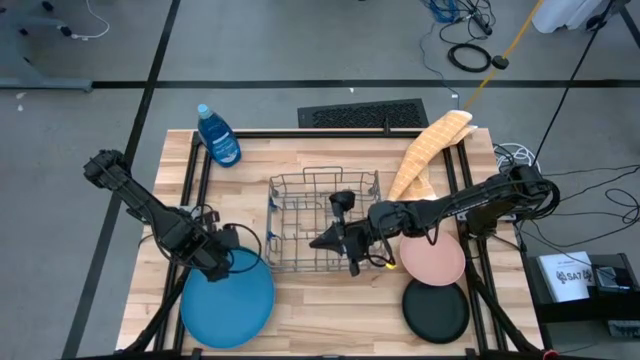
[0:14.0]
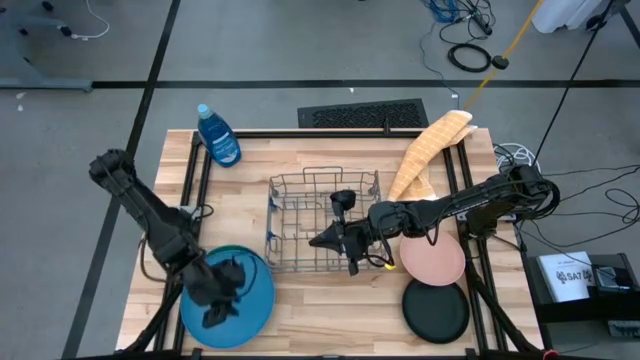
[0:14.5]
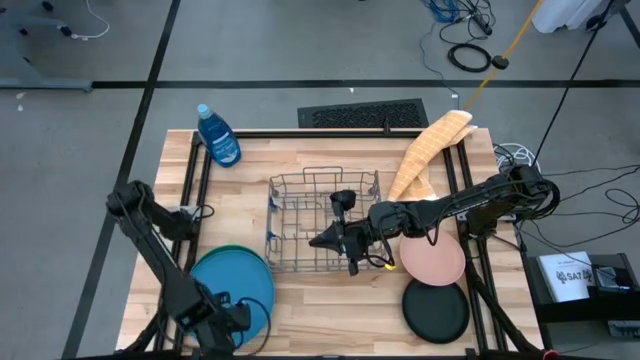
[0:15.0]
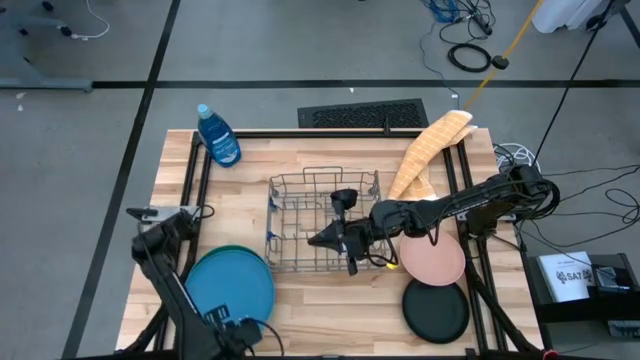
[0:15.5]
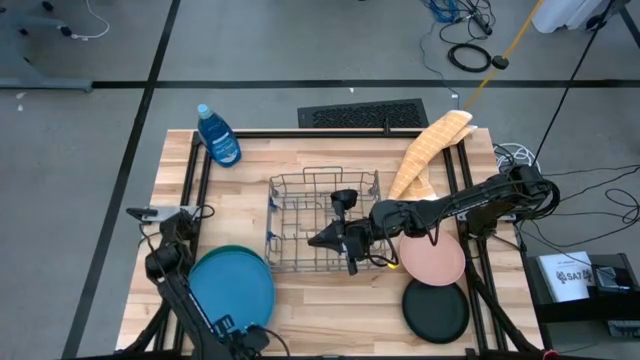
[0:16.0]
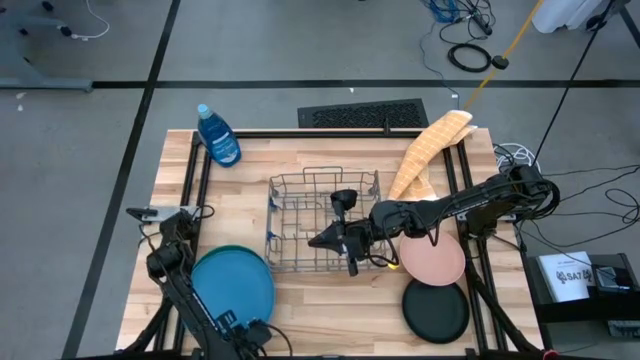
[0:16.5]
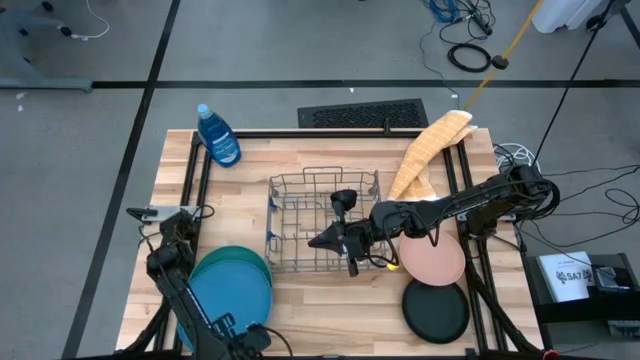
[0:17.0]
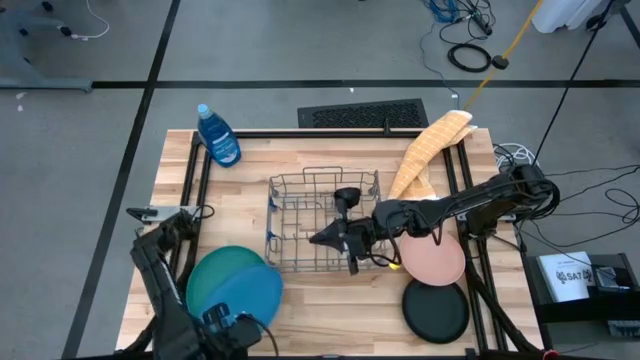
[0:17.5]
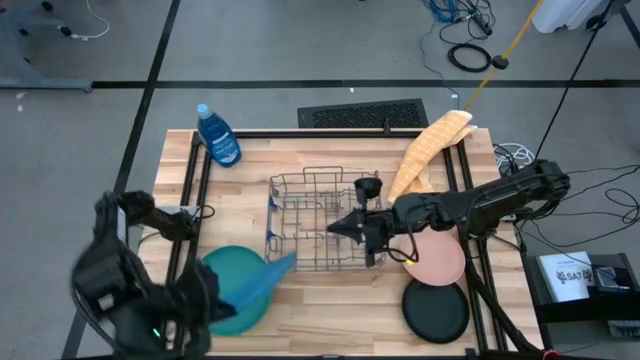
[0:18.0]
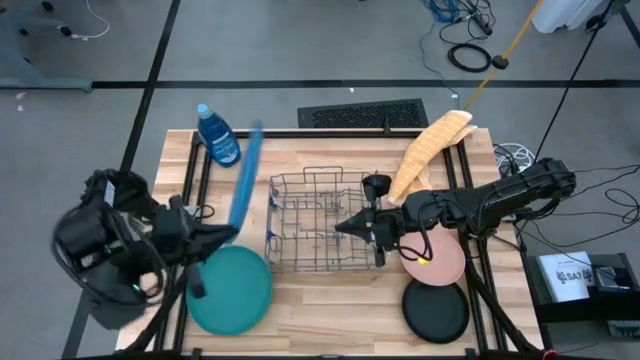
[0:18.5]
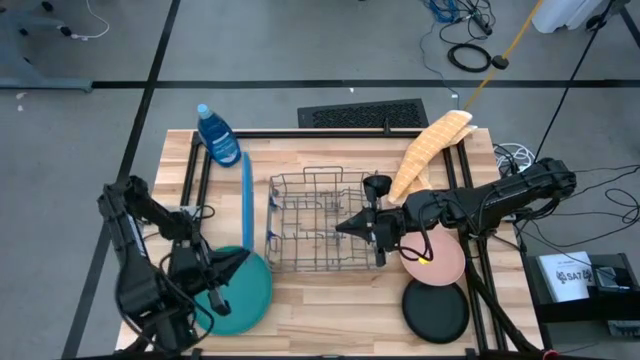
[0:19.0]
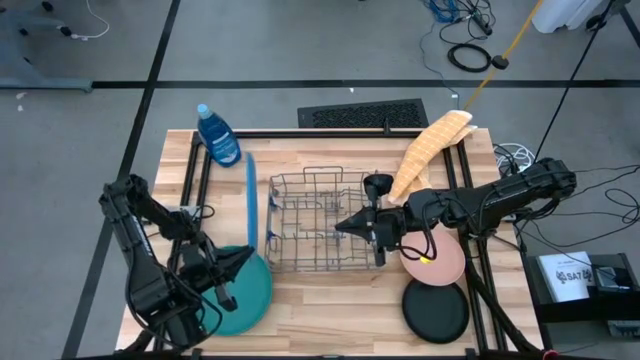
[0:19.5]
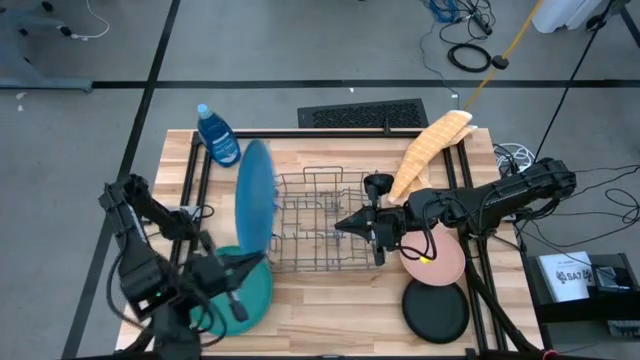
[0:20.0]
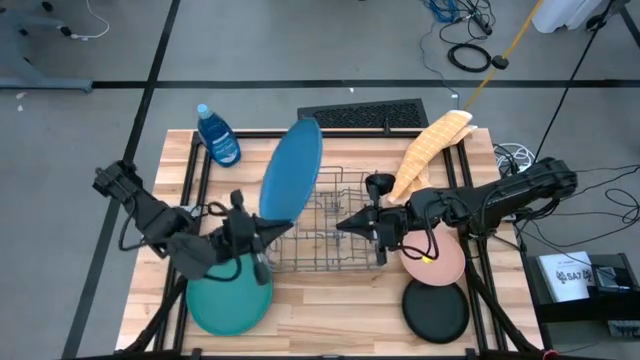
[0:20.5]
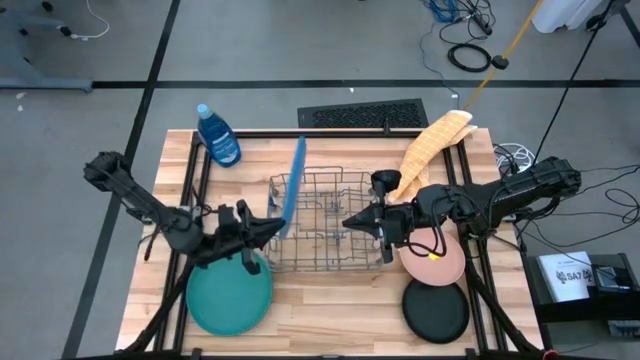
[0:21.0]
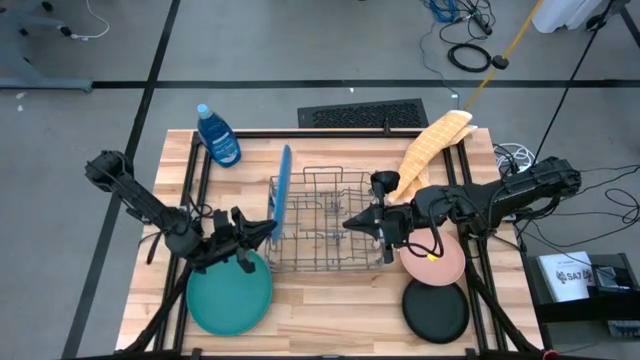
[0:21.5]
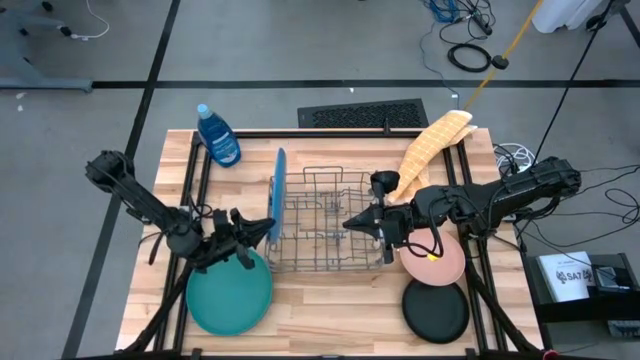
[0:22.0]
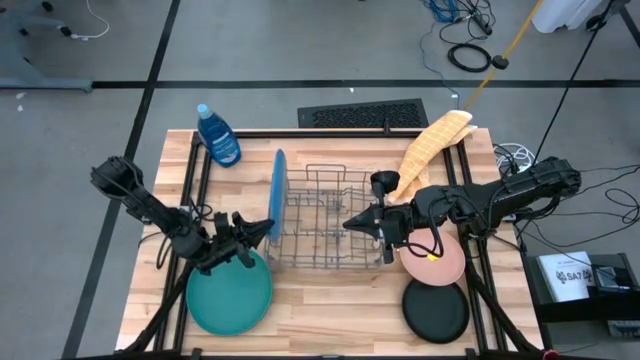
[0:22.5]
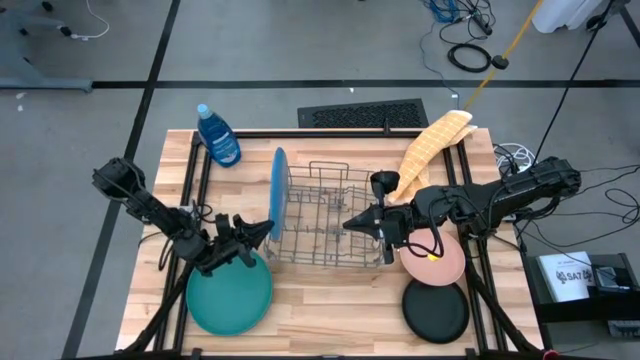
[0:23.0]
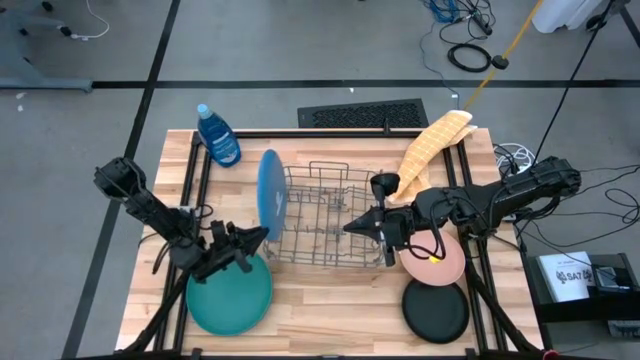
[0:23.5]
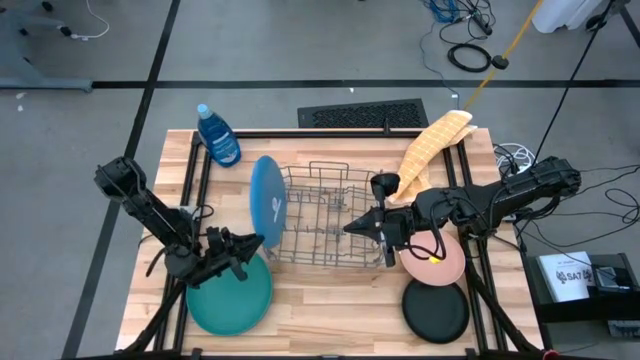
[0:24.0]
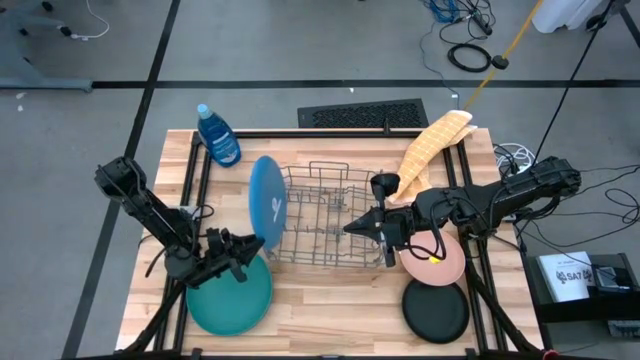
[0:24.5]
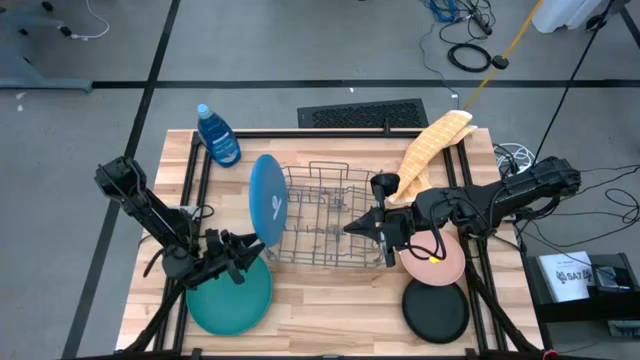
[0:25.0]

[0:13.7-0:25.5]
Task: Sort dishes
Put the blue plate into the dish rack

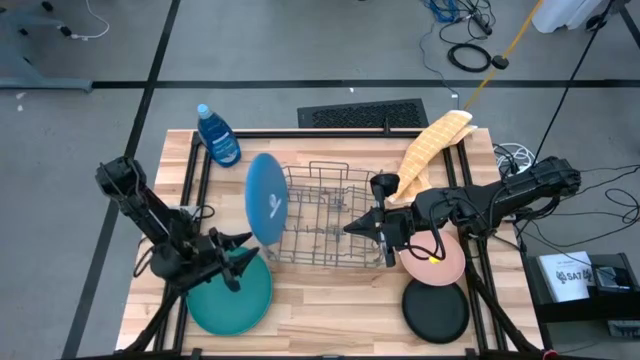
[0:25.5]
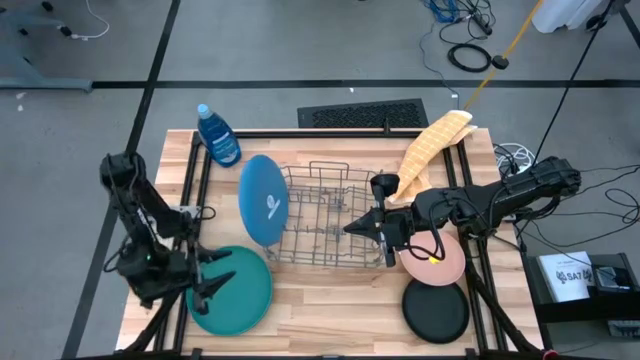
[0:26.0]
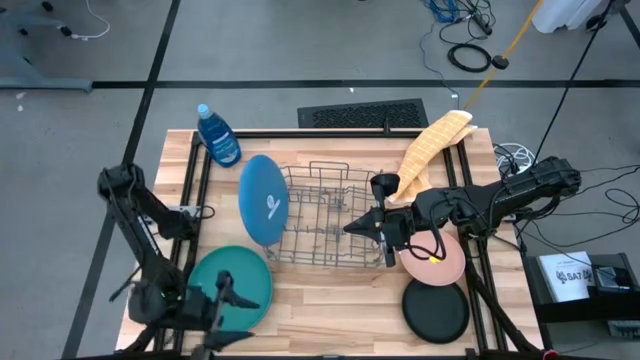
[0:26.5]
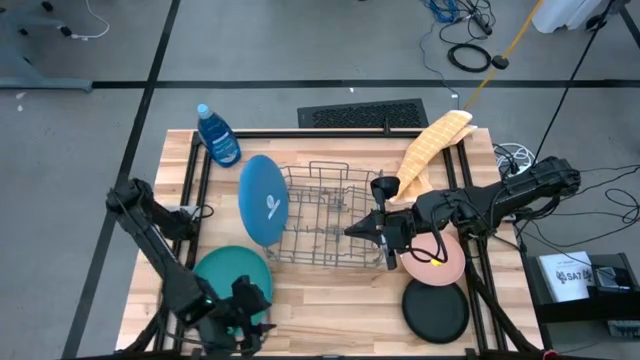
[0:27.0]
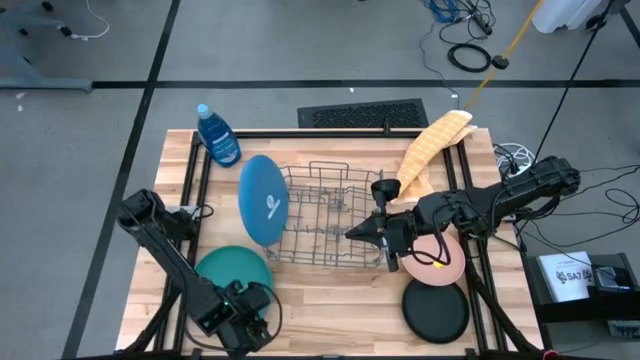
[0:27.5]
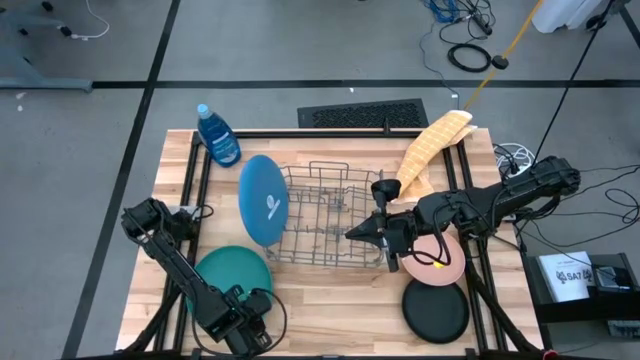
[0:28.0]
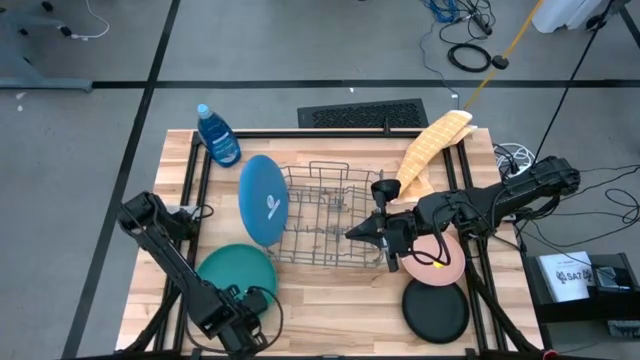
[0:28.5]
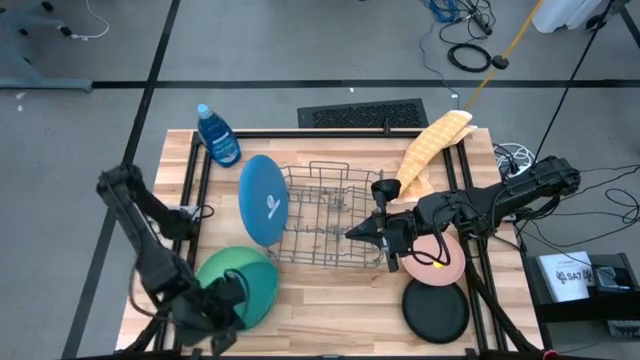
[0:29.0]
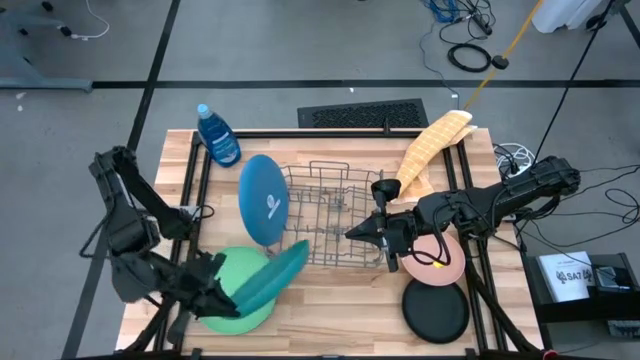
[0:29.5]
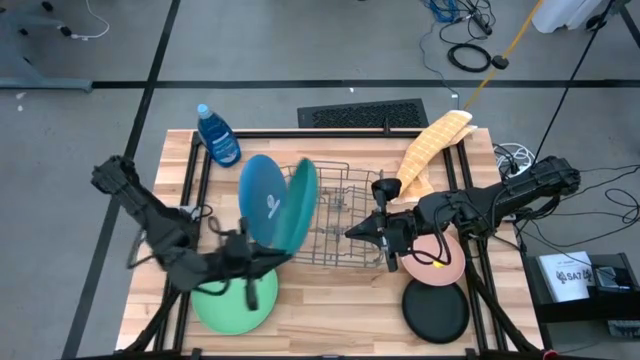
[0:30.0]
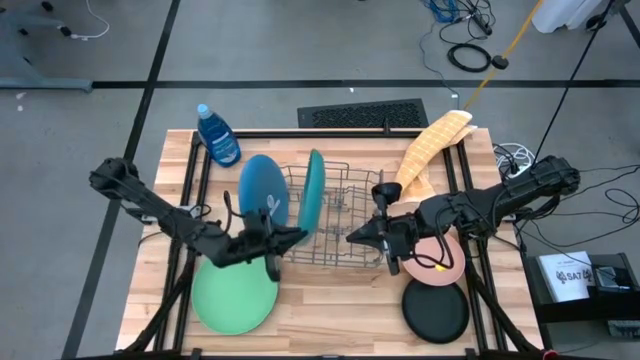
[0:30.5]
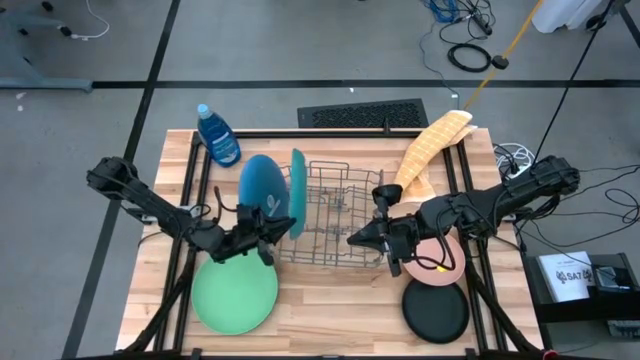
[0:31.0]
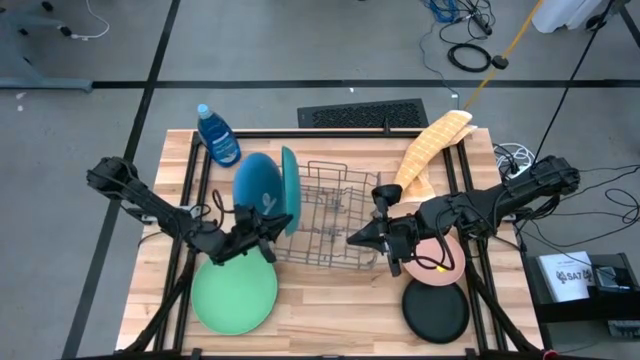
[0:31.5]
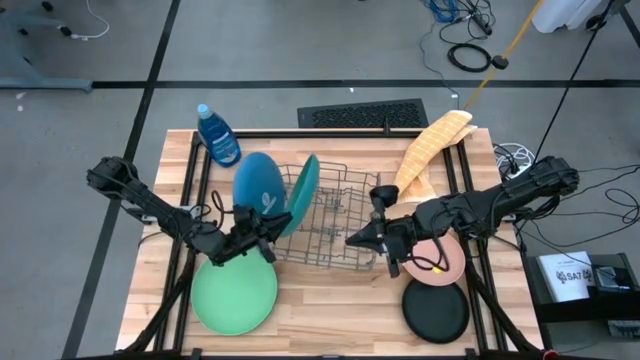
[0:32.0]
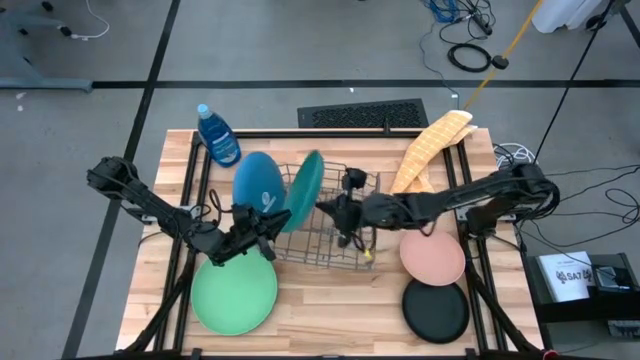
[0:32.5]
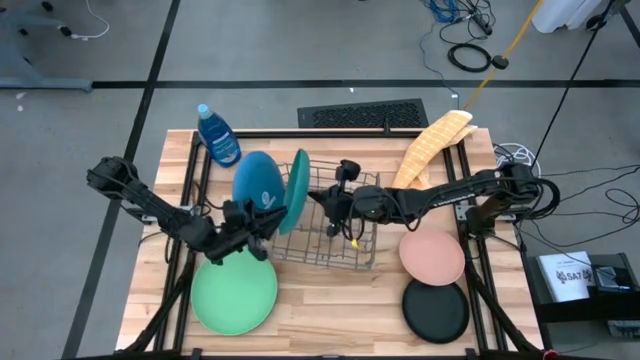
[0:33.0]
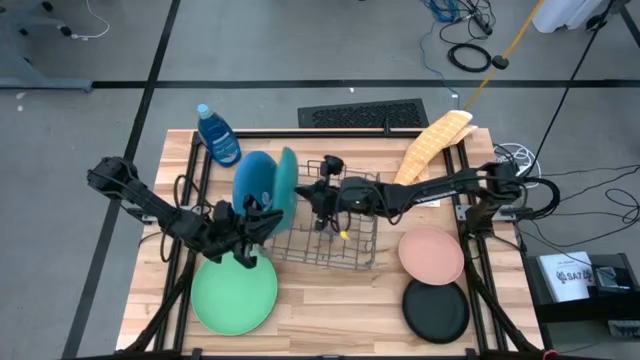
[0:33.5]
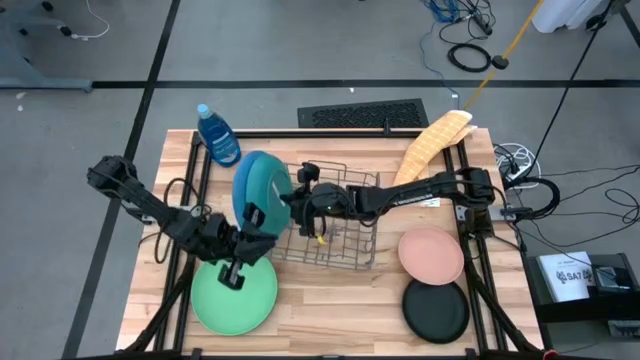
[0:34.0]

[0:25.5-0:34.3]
Put the top dark green plate into the dish rack
